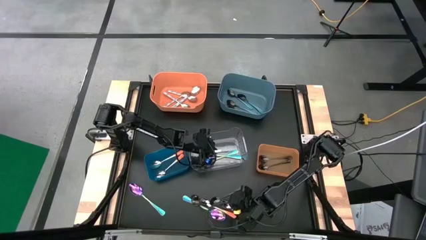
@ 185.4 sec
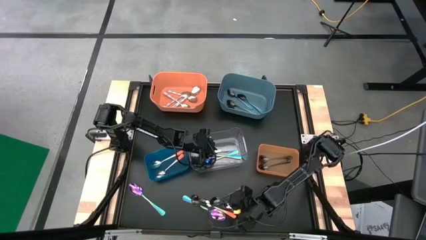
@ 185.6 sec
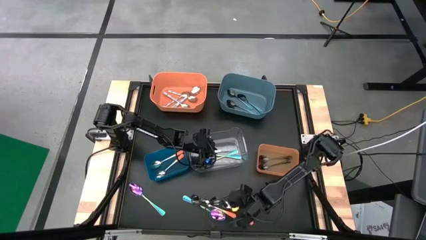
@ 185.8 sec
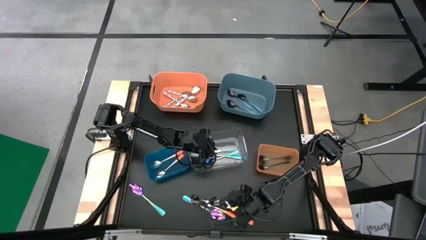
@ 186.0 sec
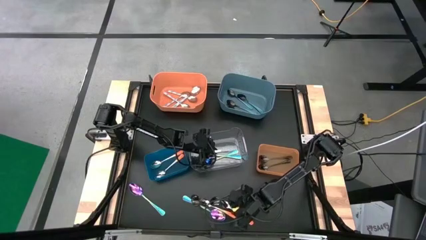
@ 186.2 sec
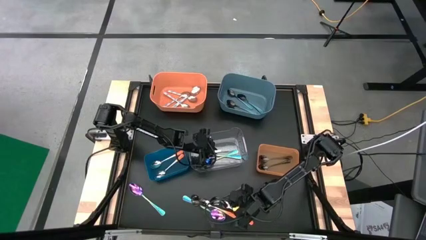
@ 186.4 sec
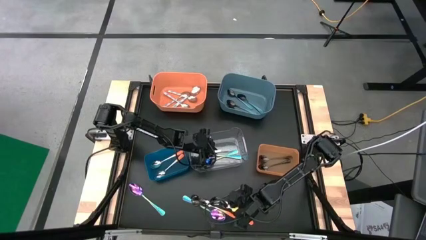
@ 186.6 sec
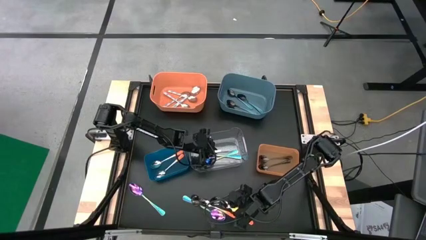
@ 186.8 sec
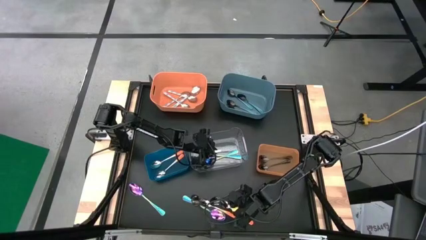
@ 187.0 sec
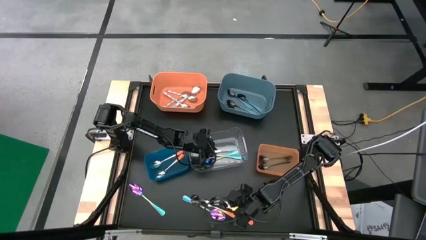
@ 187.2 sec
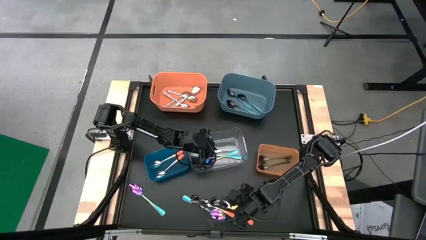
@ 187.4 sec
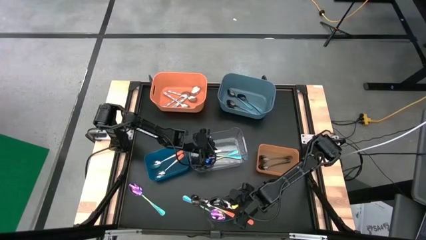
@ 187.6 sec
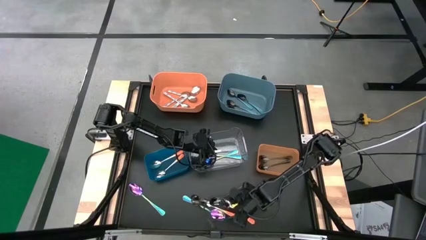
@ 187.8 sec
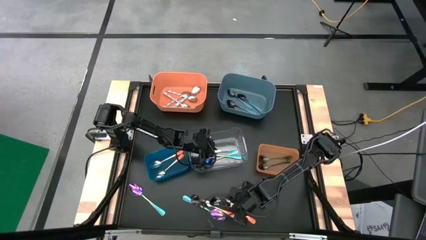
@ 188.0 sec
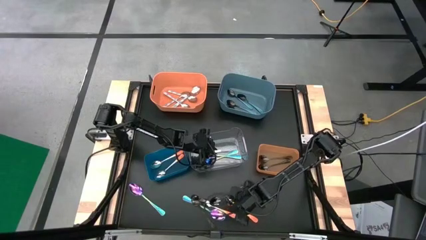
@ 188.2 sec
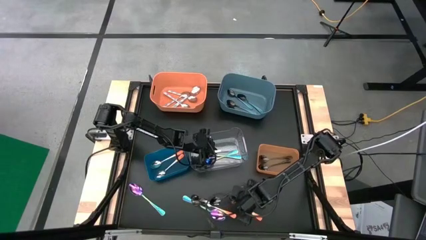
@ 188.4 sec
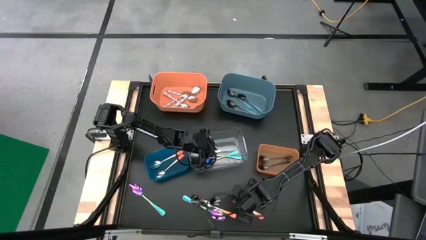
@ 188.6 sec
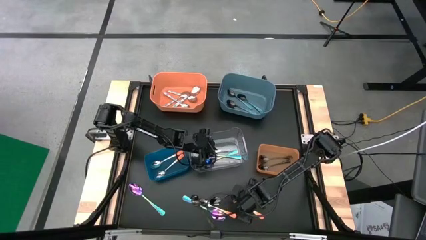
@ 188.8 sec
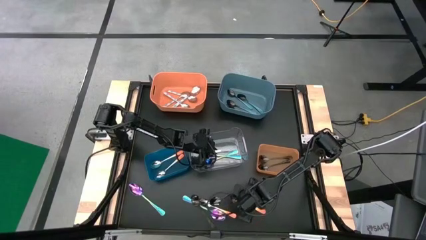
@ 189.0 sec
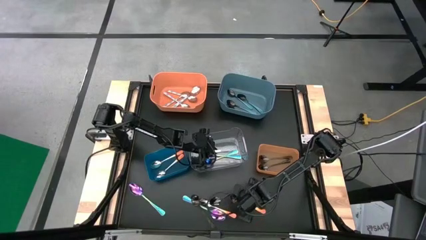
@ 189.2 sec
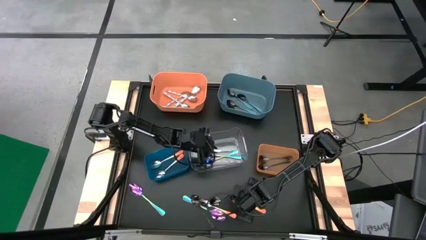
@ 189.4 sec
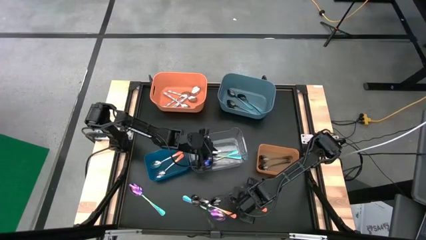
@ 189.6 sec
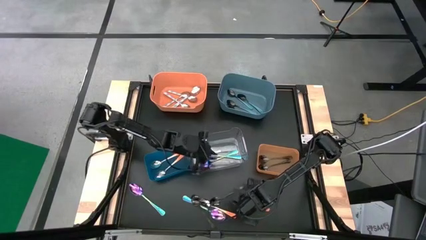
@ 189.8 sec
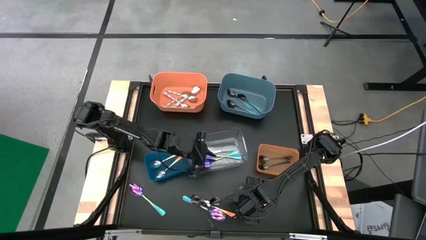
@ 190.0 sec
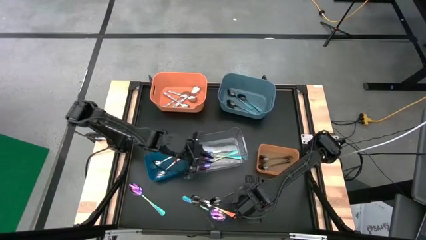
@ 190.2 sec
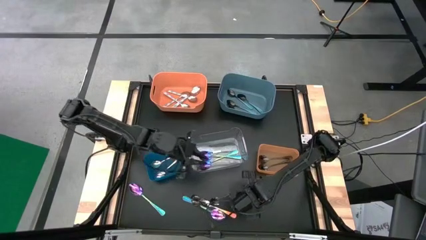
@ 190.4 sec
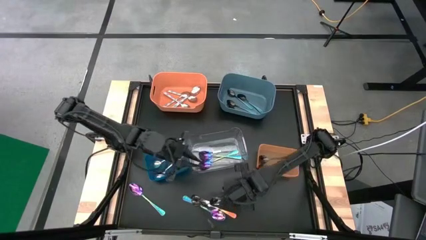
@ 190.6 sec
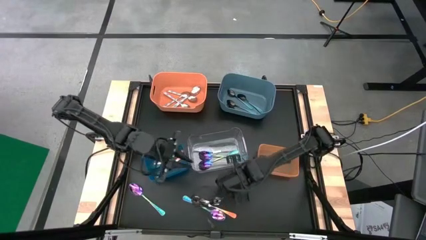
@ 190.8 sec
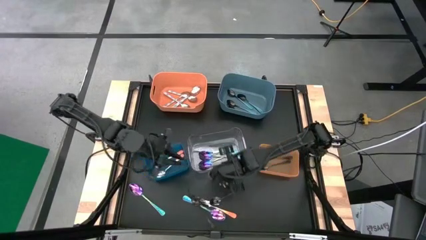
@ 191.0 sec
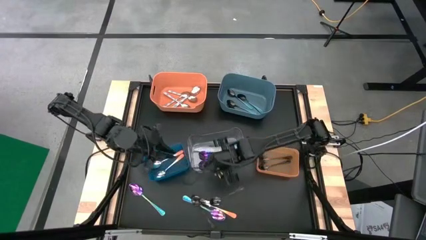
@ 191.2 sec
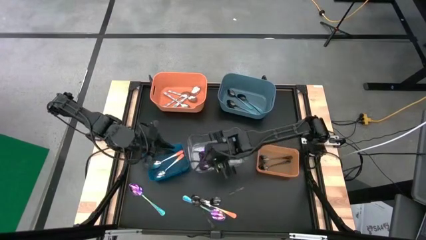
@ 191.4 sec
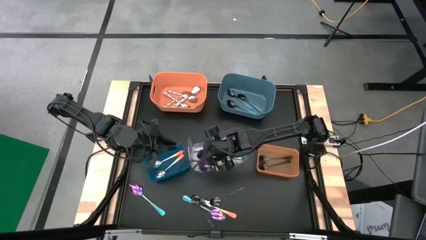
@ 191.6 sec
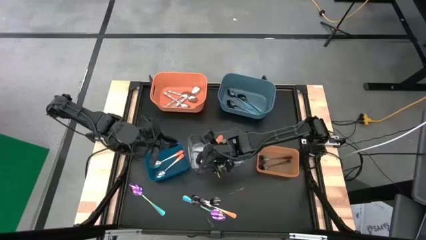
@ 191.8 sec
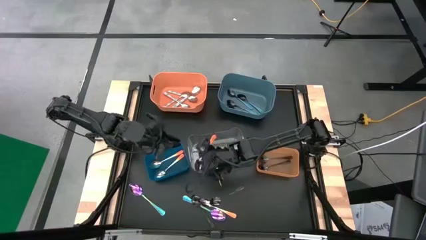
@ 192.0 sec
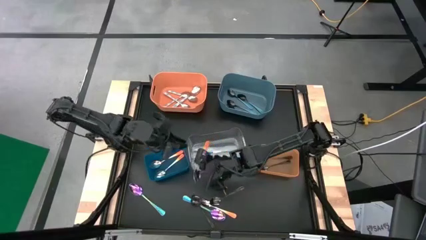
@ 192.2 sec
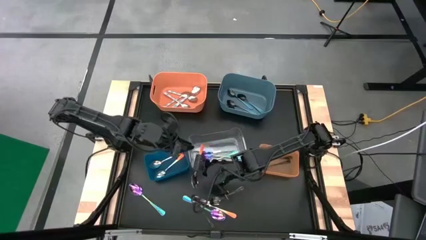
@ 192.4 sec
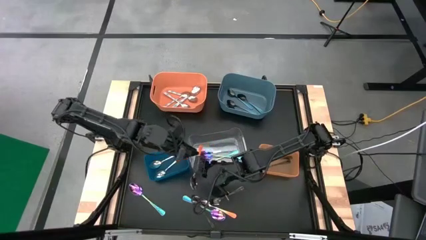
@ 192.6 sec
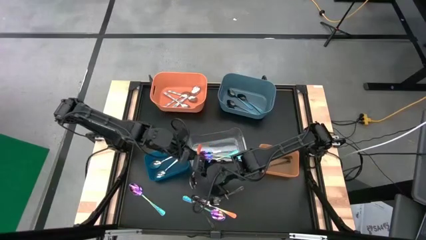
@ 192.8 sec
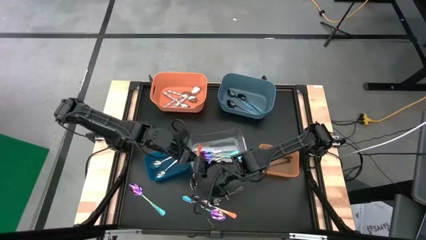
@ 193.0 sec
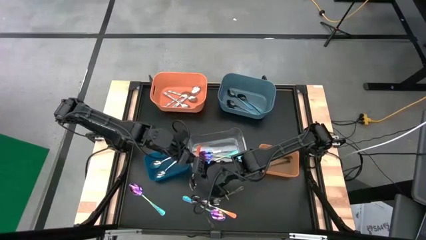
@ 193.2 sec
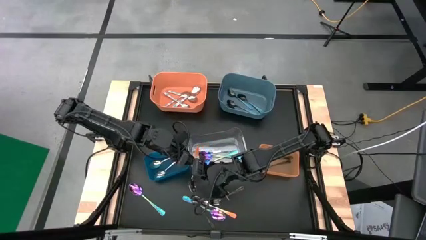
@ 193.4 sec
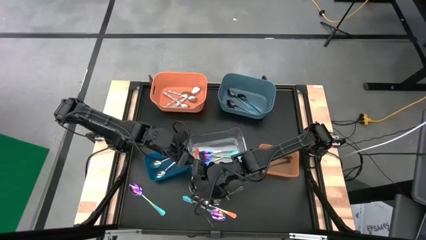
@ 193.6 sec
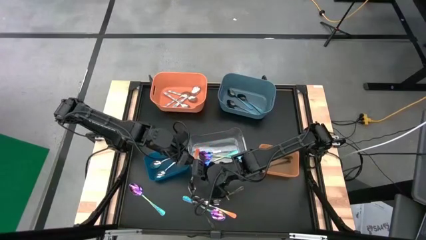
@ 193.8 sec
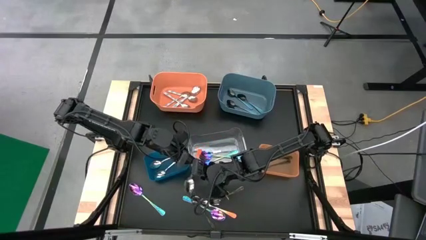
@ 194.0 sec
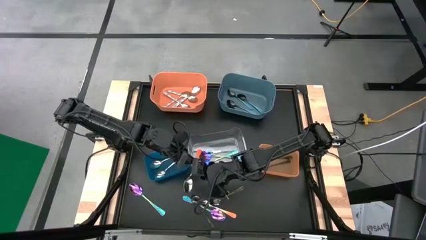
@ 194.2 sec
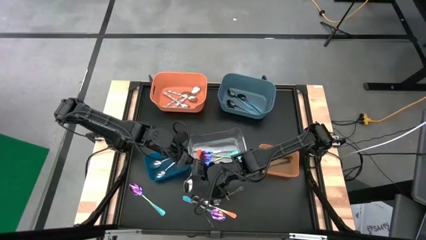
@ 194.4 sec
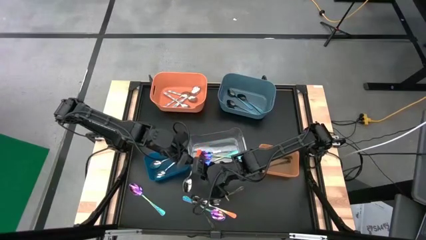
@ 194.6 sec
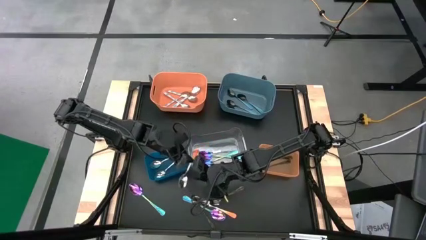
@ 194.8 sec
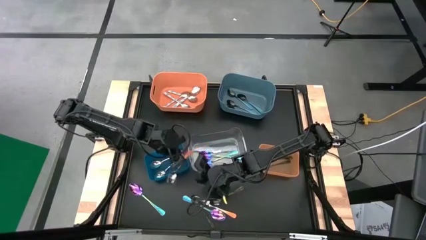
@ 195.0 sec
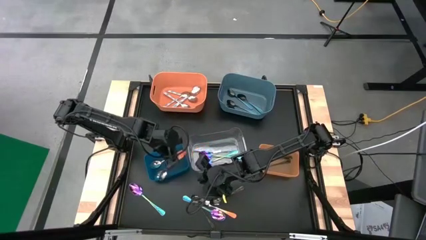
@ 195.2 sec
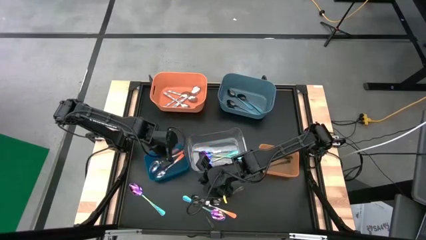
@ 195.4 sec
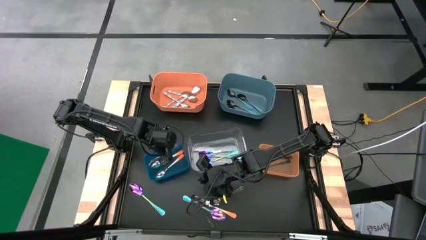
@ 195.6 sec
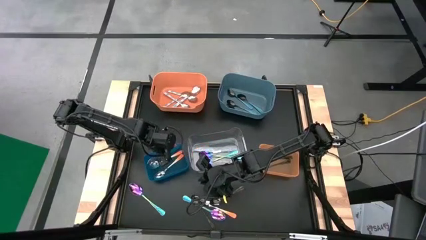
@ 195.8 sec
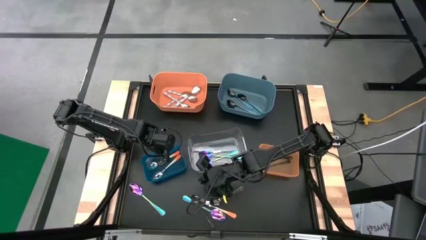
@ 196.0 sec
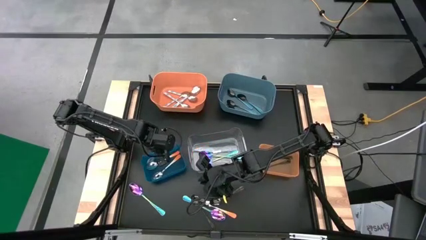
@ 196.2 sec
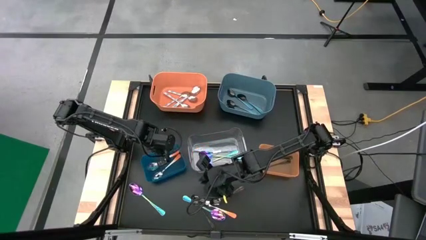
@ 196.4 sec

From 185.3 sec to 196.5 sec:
Task: Sort silverware by color (type)
Put the orange spoon into the blue bin

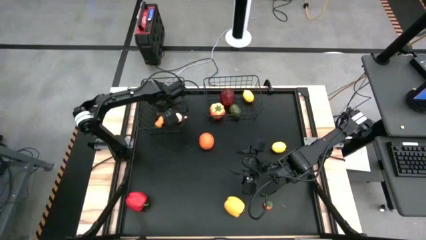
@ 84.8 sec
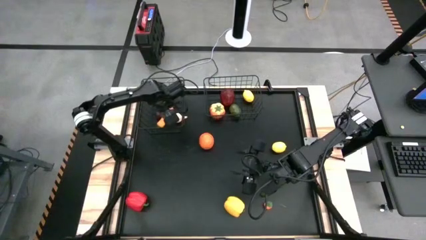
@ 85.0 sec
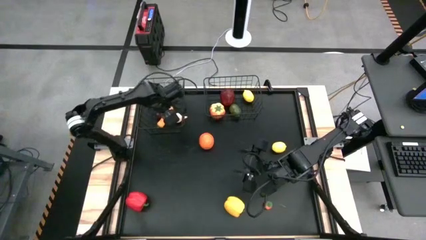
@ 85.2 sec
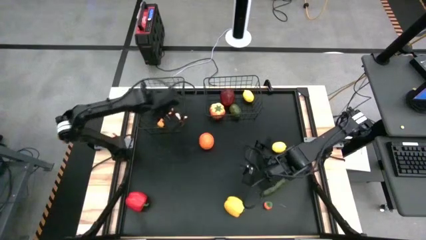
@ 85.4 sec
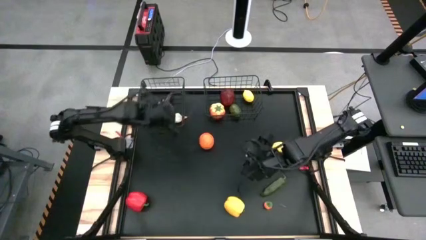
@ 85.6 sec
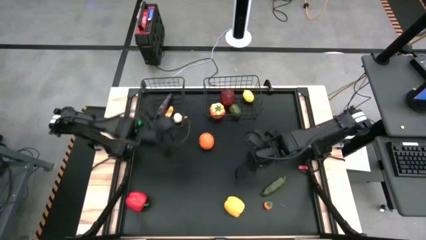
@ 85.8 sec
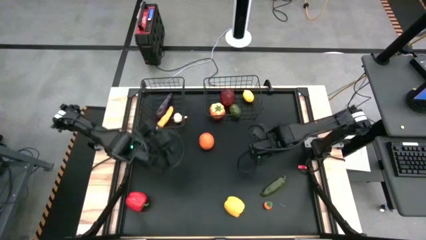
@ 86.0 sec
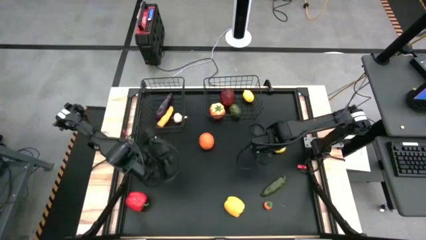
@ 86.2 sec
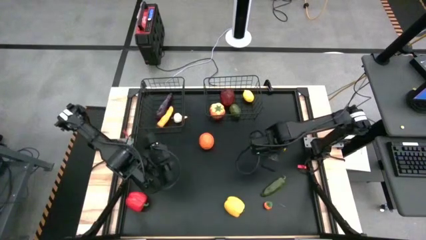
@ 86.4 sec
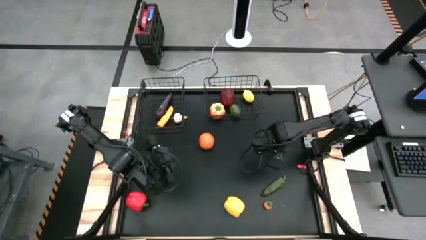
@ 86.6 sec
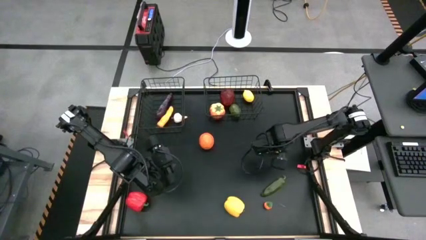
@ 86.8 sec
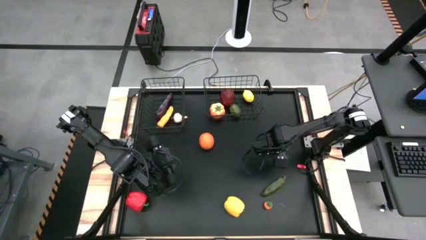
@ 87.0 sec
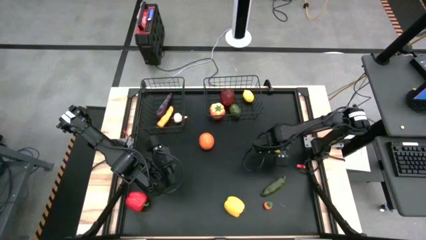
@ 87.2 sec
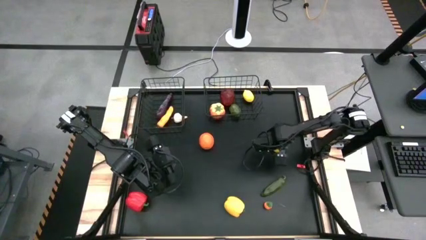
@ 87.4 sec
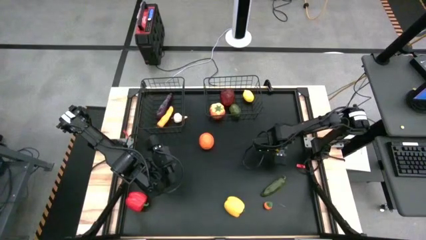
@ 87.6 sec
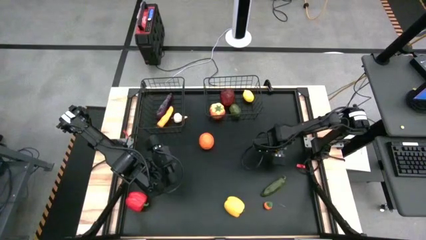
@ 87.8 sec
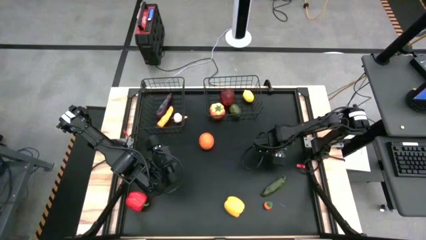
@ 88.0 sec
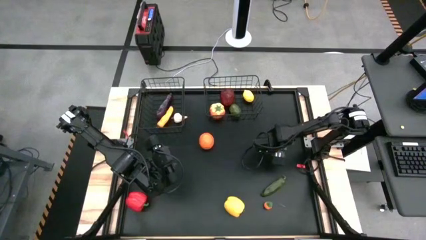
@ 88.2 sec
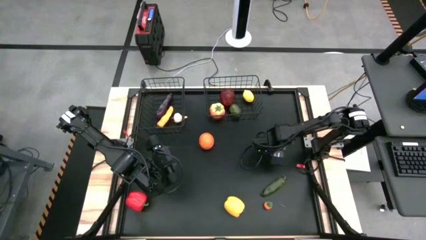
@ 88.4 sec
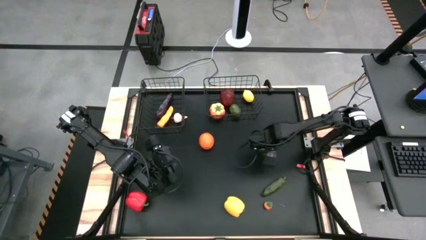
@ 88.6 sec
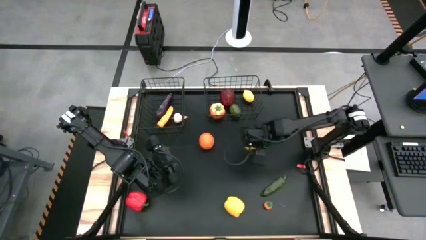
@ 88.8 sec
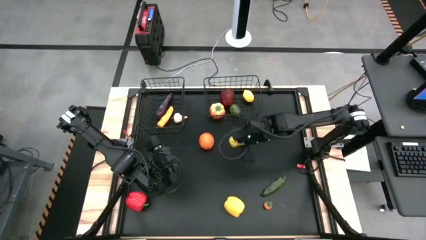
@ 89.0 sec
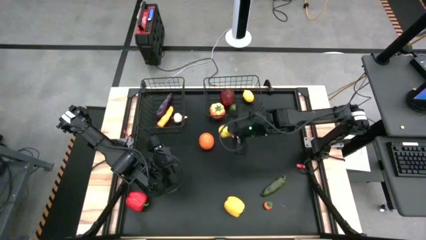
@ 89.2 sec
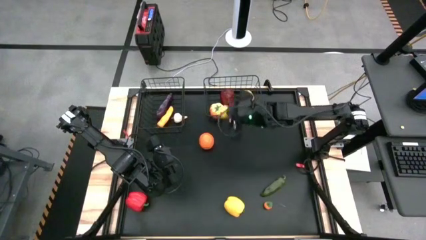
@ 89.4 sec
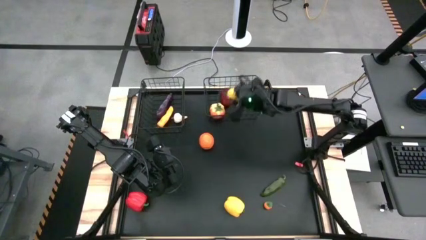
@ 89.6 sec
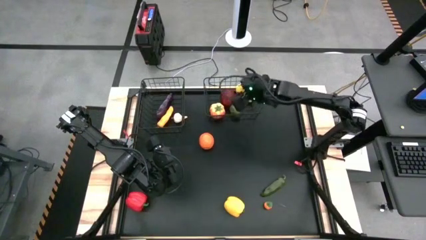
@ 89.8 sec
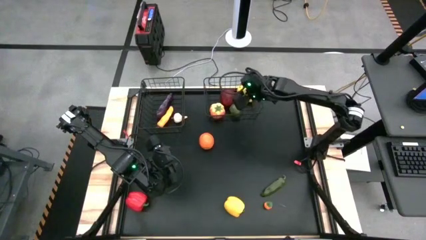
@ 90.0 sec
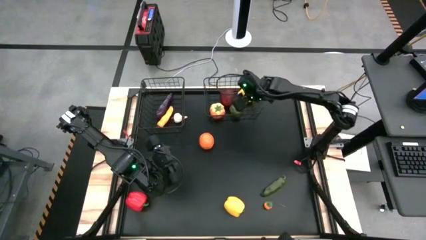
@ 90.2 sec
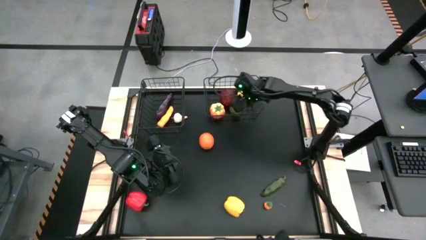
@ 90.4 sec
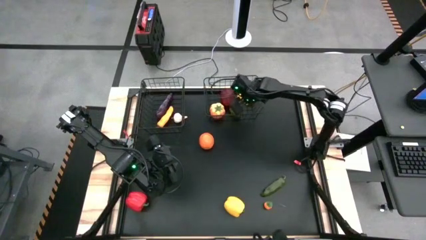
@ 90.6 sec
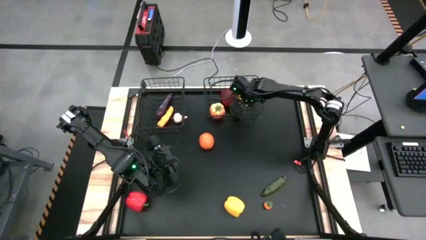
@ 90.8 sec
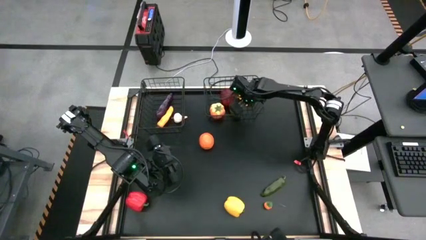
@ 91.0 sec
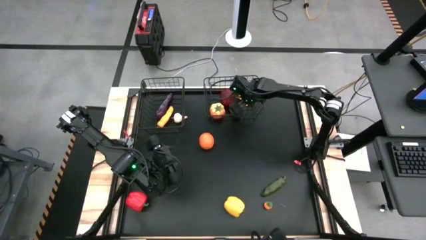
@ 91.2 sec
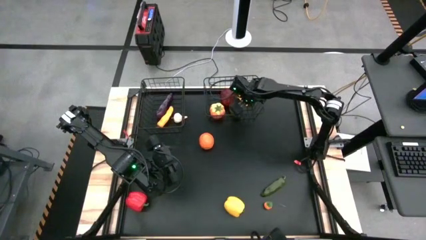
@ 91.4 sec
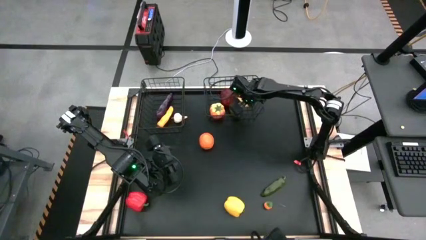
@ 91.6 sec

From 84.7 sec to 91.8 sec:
Task: Sort produce into baskets
Put the yellow lemon into the right black wire basket
